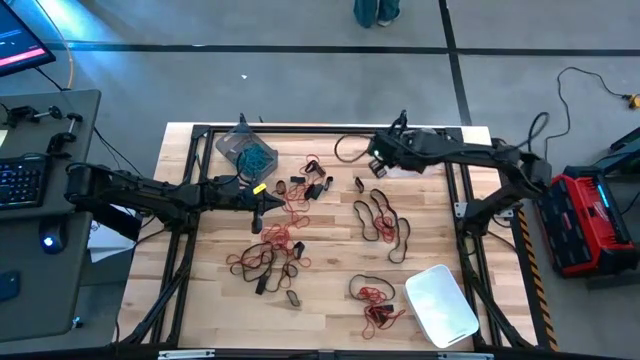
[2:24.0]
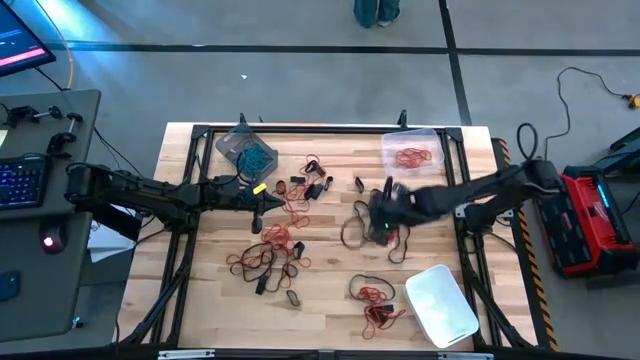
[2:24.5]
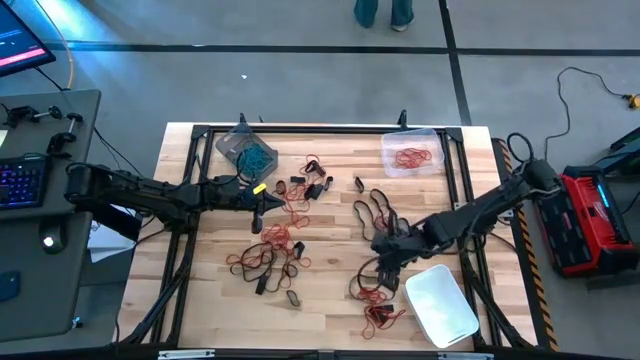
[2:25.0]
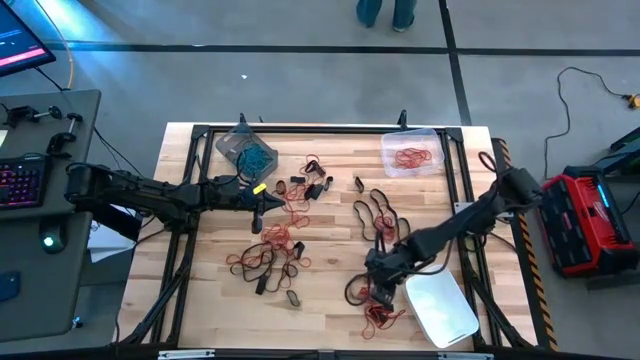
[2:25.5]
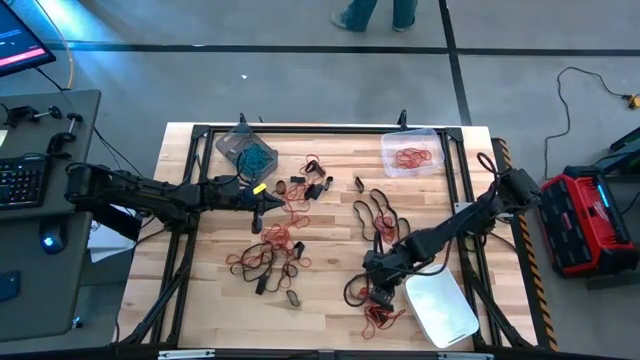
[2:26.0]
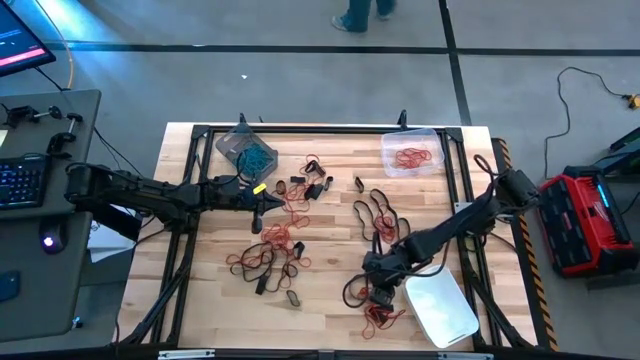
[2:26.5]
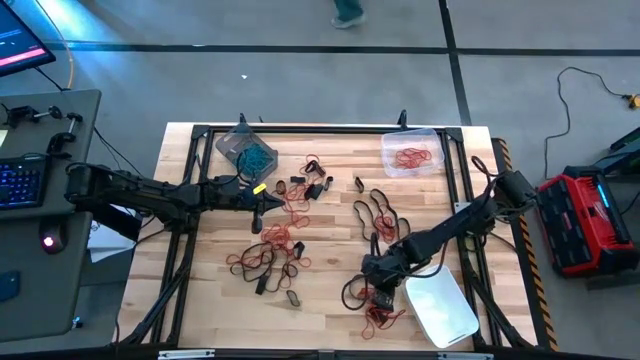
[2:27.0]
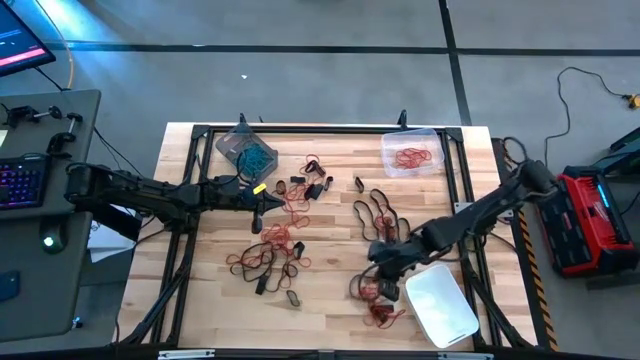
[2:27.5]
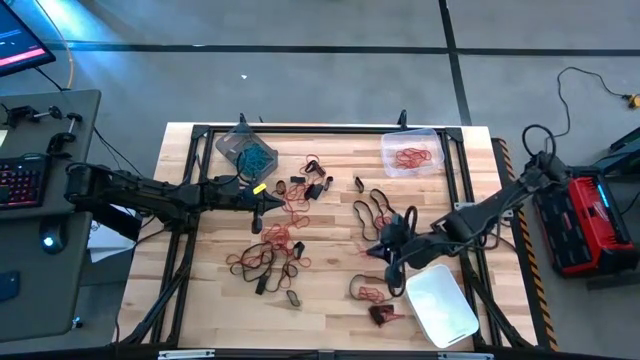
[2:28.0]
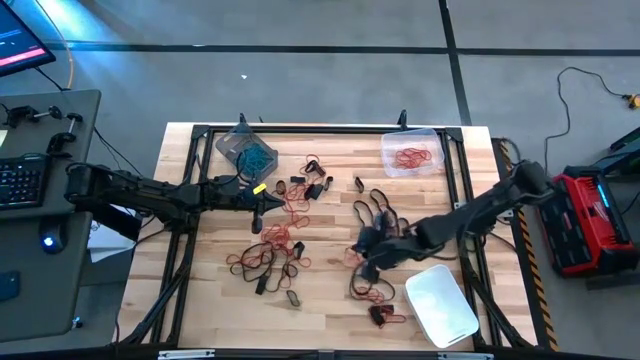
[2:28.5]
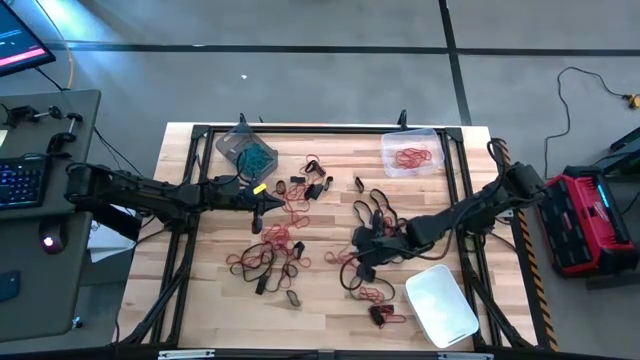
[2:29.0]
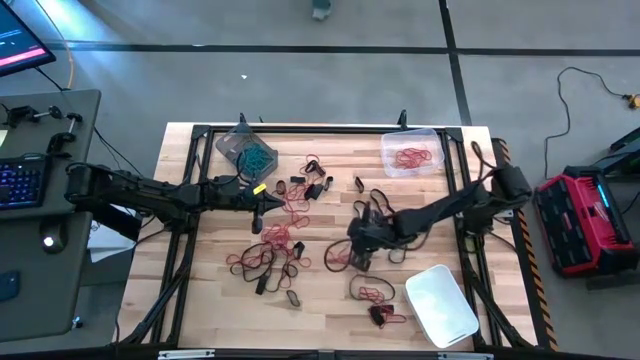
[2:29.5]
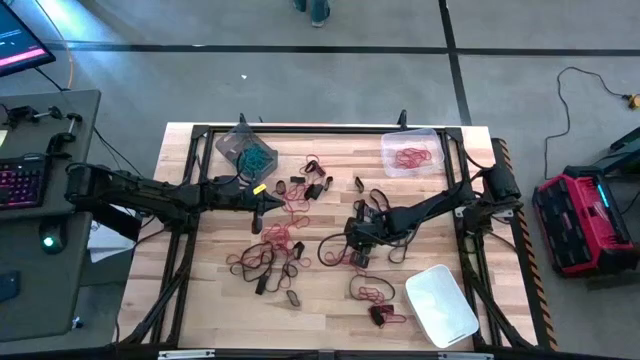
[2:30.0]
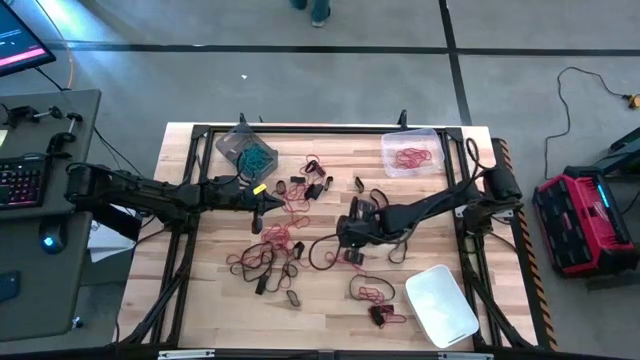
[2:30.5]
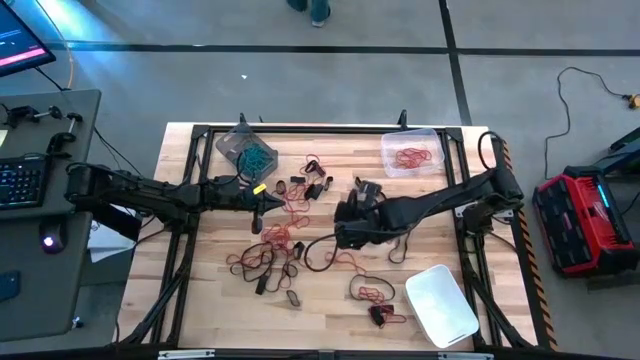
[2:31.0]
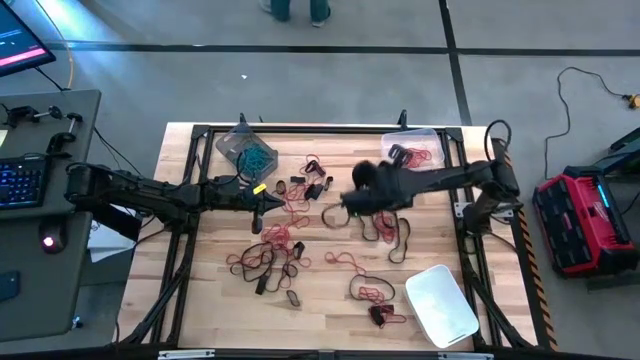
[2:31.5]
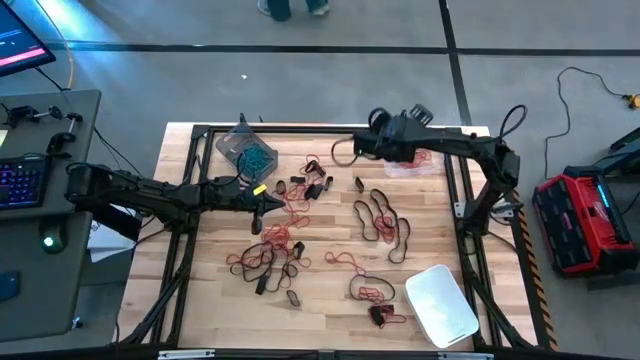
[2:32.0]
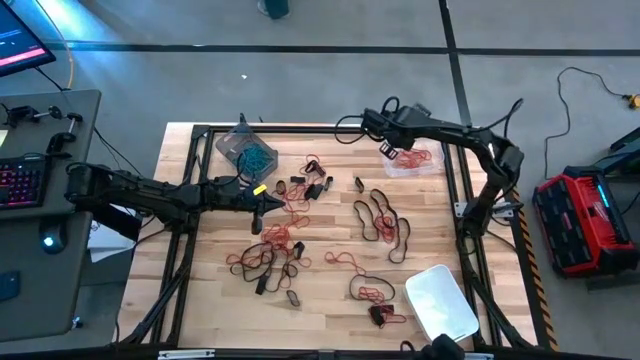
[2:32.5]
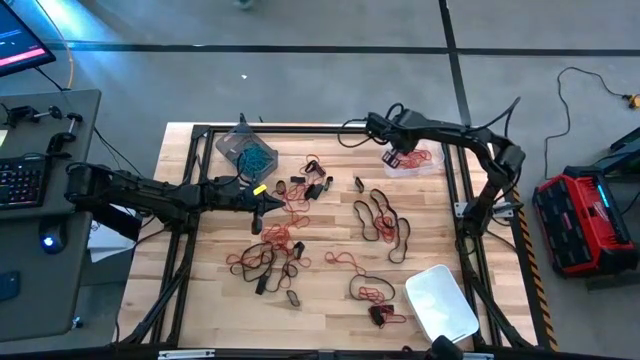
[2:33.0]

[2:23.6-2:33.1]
Task: Sort rubber bands into baskets
Put the red rubber band into the transparent bin

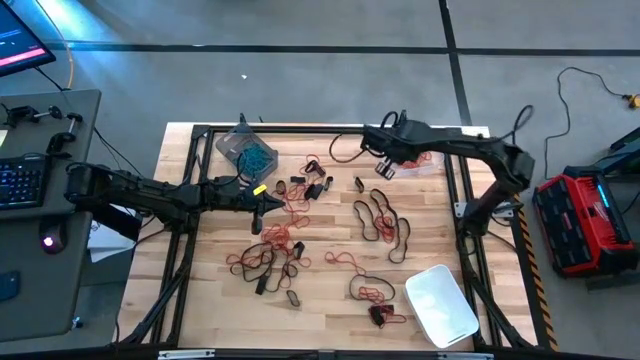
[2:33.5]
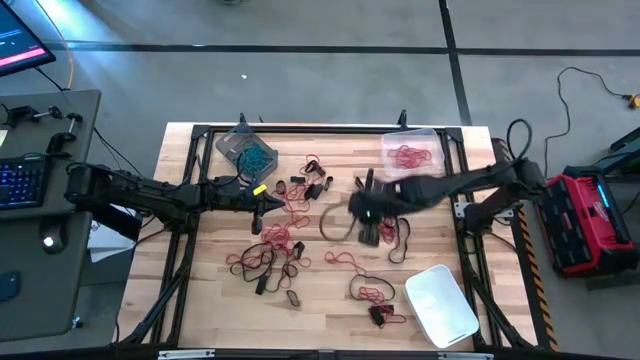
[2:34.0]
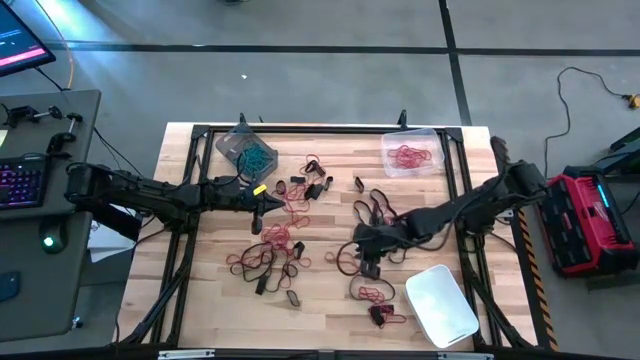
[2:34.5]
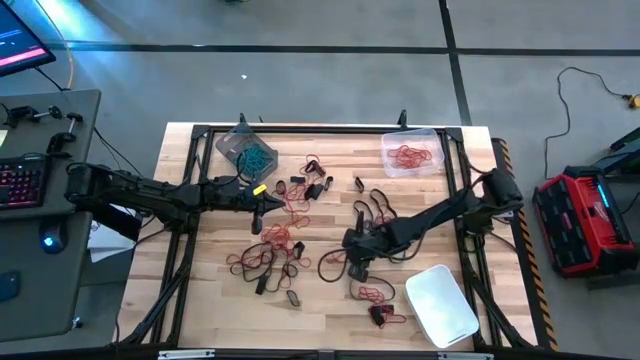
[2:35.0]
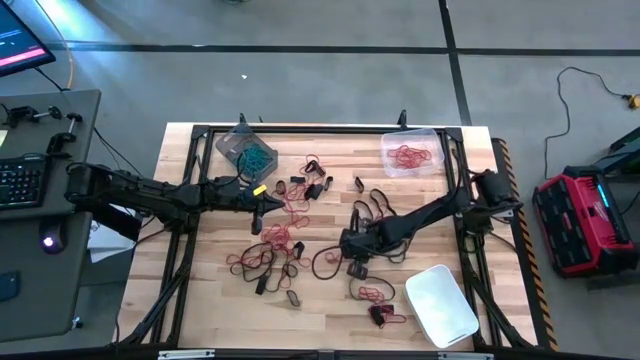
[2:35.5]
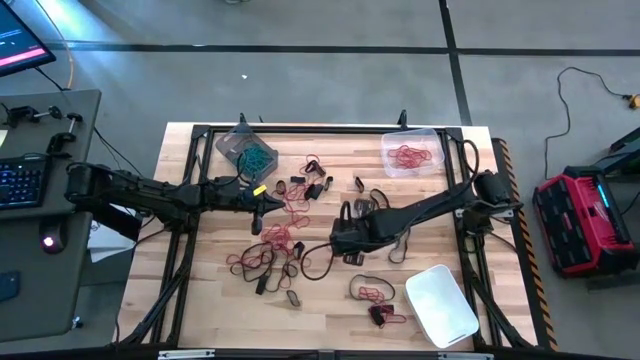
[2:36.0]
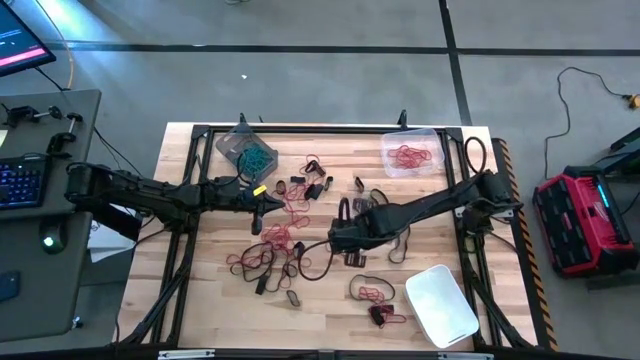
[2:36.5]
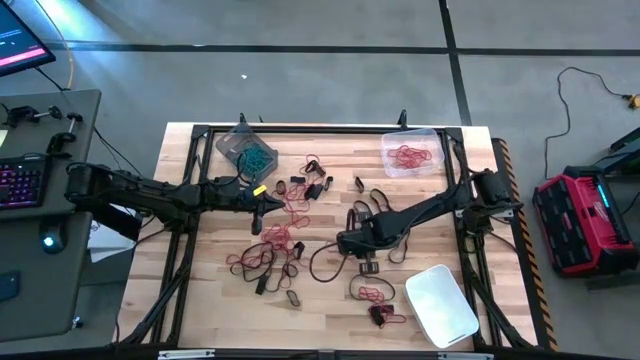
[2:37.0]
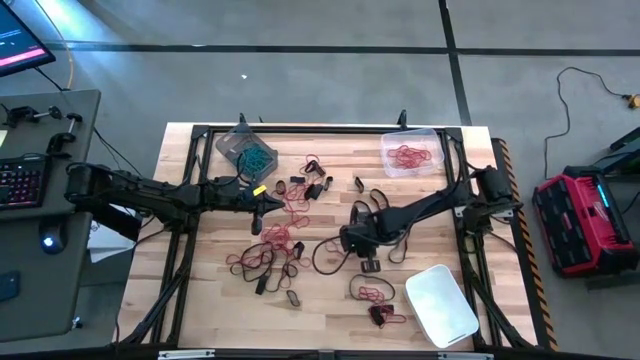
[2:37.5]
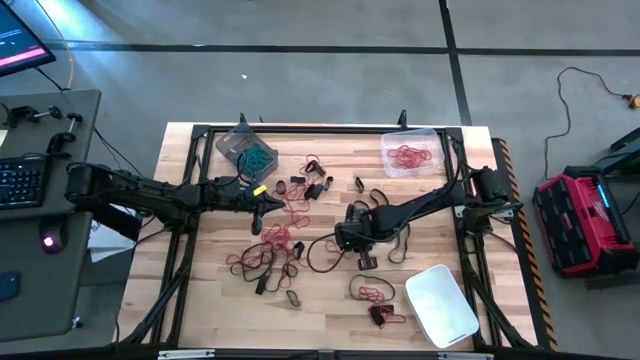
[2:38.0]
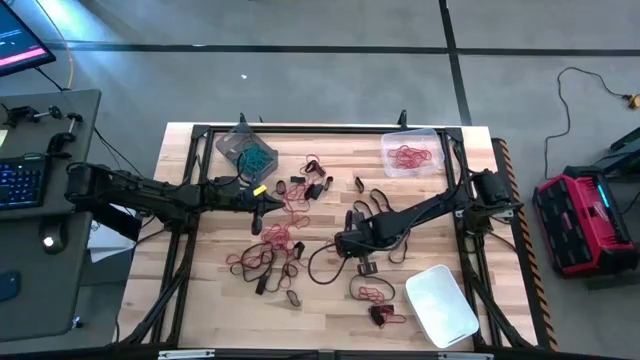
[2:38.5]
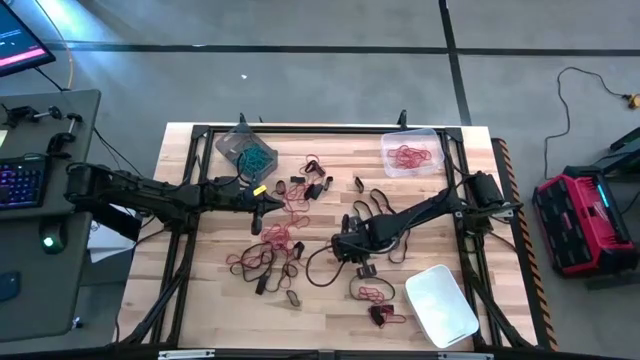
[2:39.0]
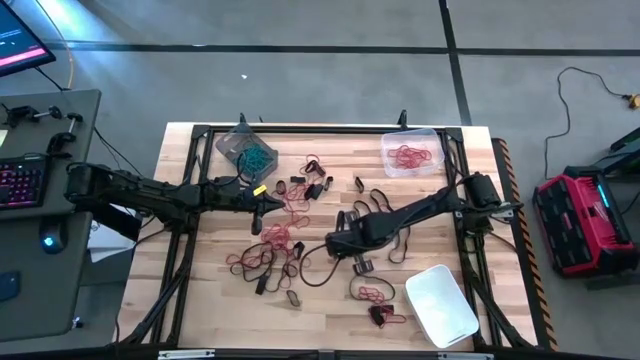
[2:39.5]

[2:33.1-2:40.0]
Put the red rubber band into the transparent bin

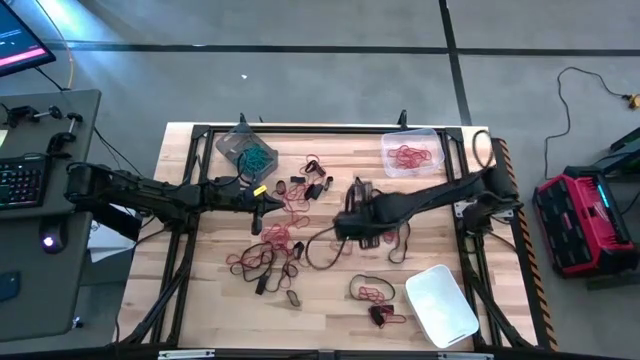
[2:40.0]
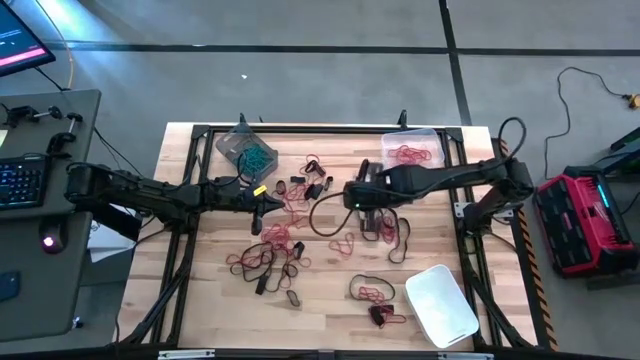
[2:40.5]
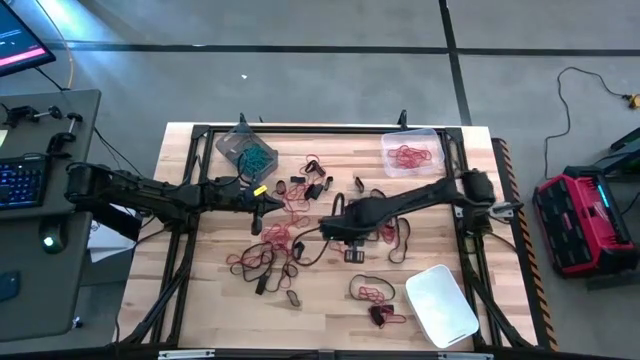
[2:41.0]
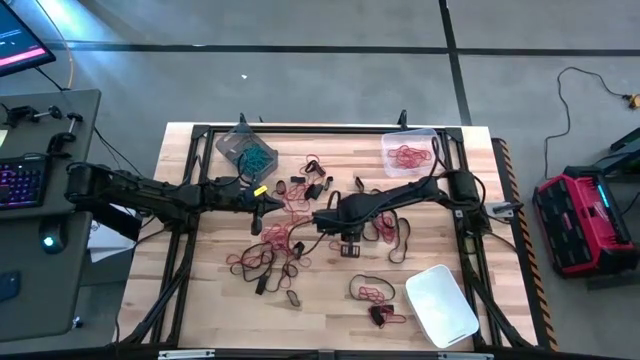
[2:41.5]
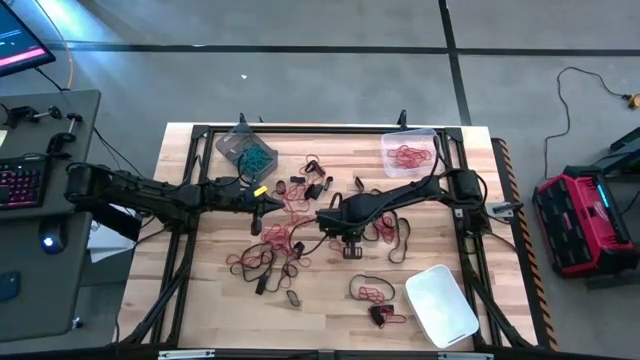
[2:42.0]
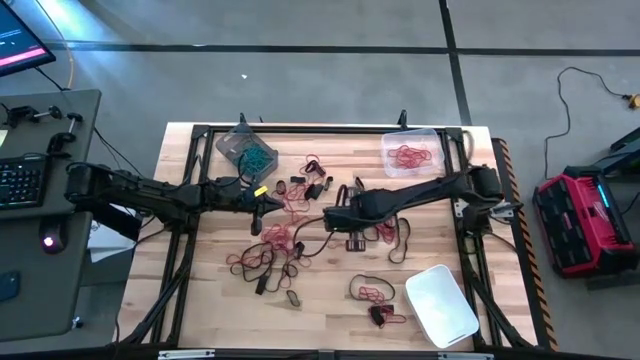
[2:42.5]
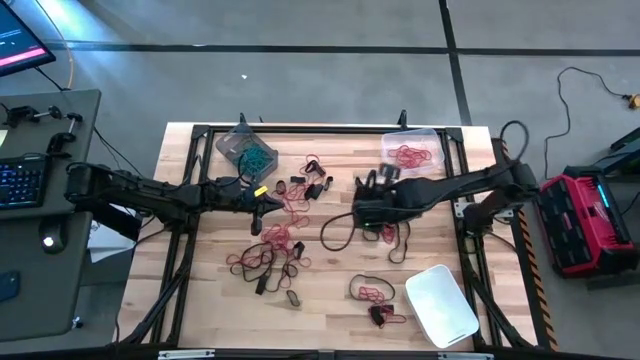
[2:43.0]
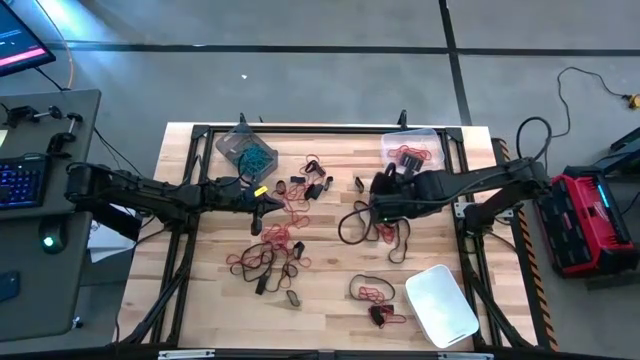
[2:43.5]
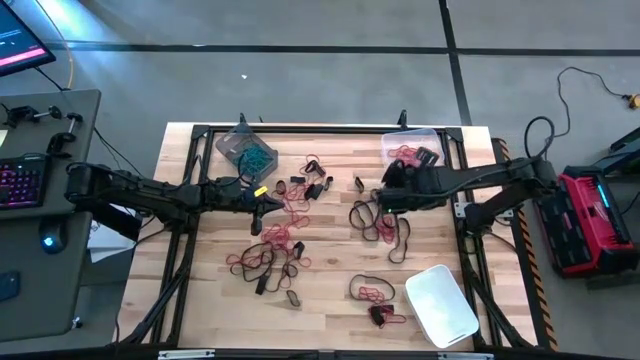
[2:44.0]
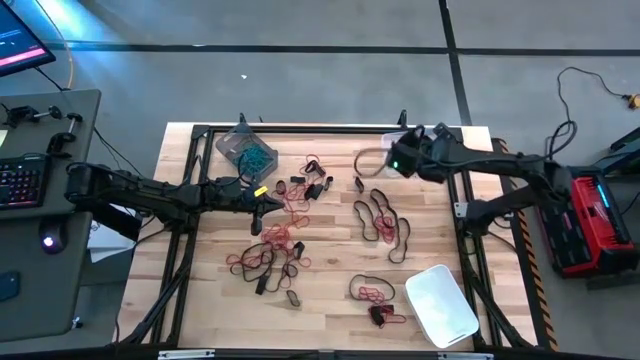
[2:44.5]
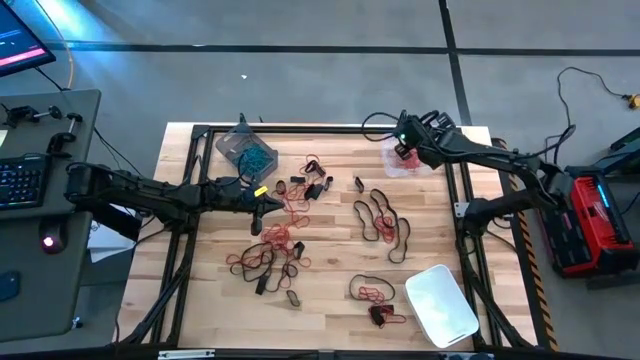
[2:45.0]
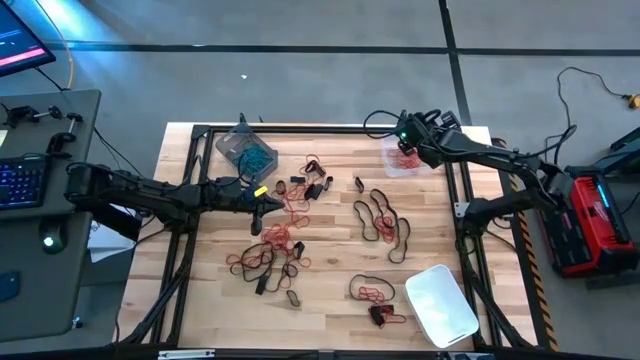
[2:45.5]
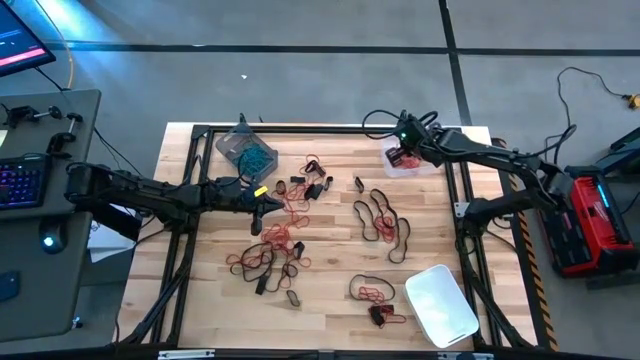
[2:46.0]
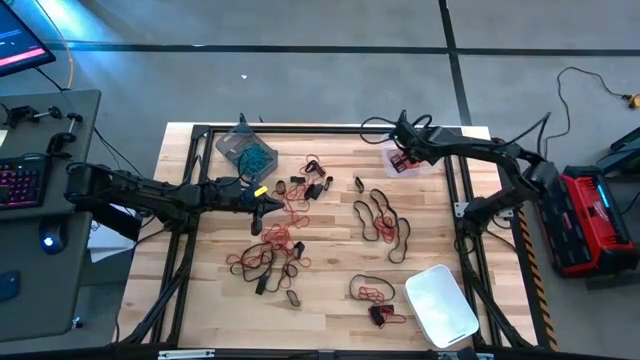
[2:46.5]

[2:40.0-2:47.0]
Put the red rubber band into the transparent bin
